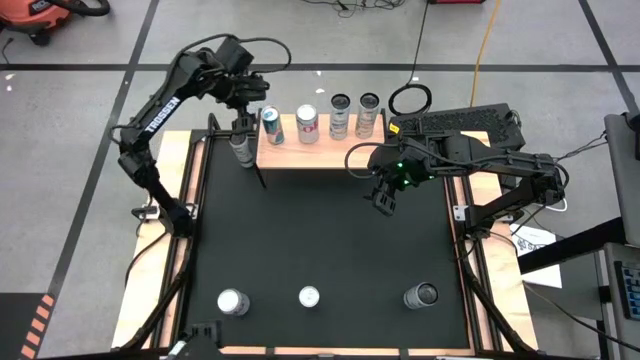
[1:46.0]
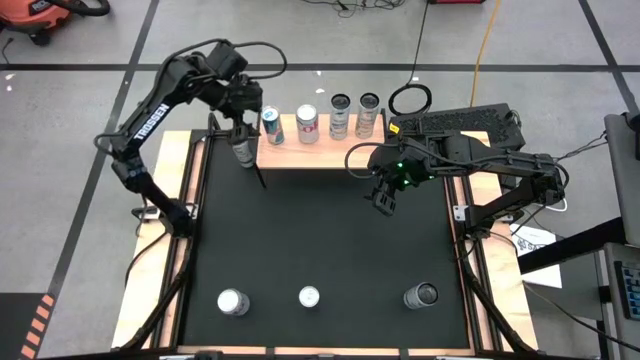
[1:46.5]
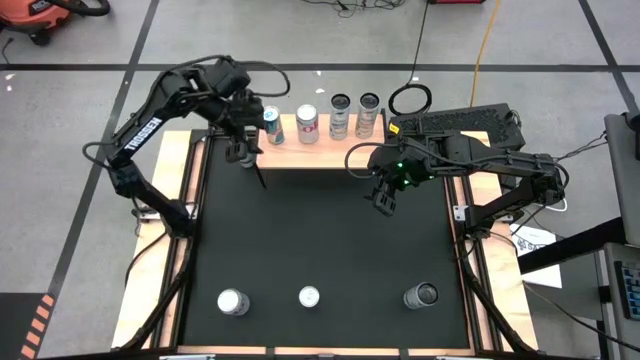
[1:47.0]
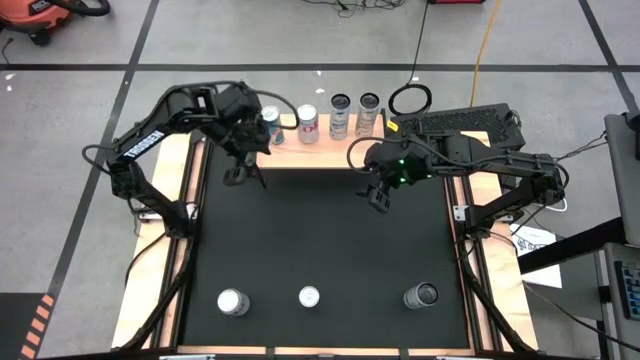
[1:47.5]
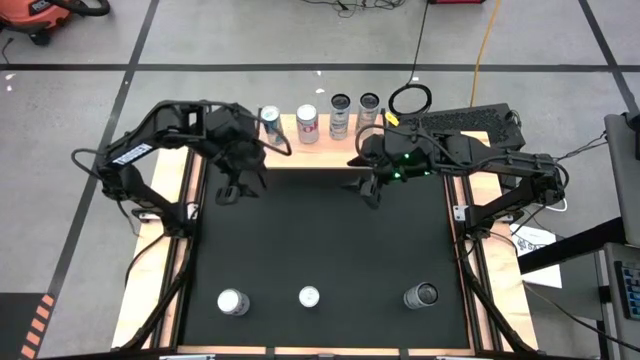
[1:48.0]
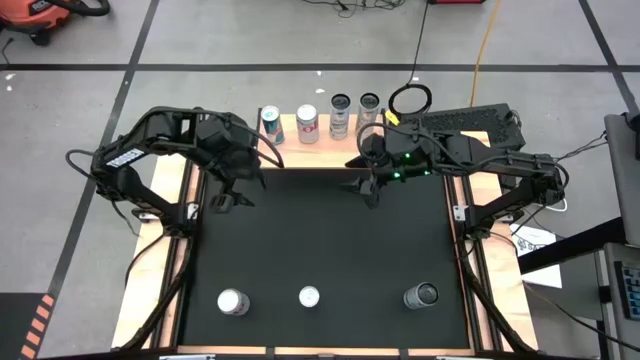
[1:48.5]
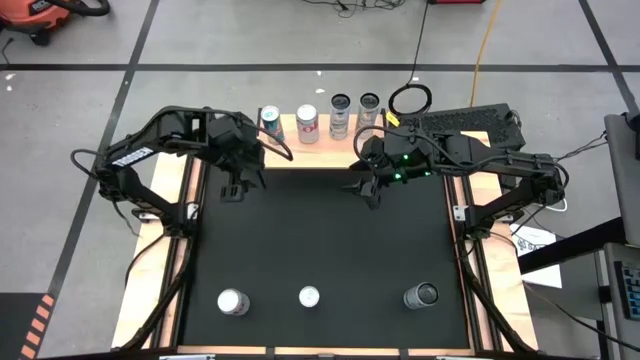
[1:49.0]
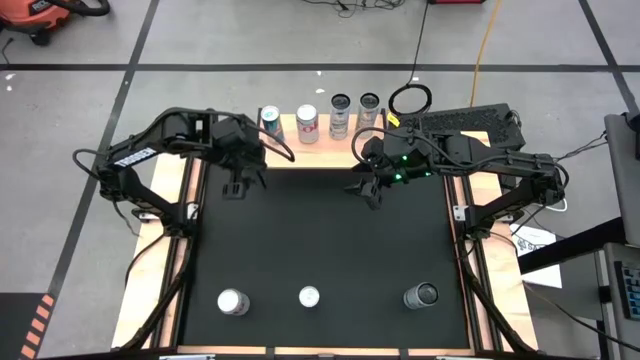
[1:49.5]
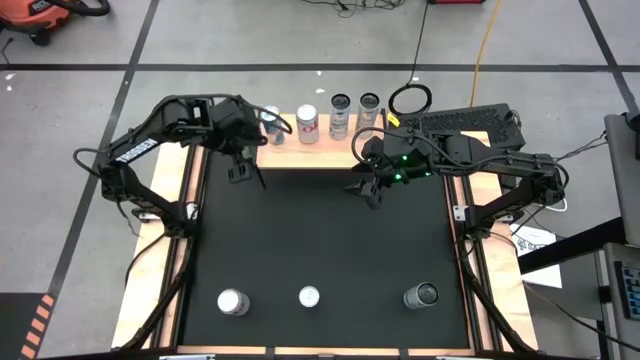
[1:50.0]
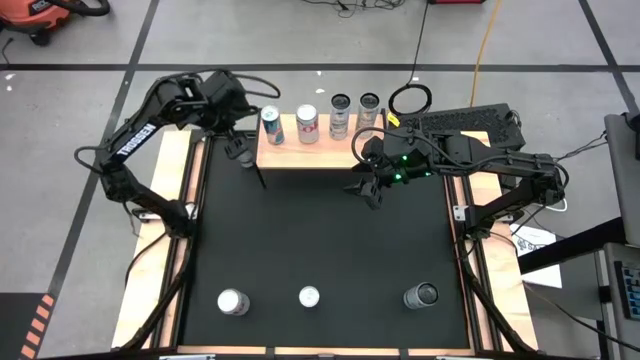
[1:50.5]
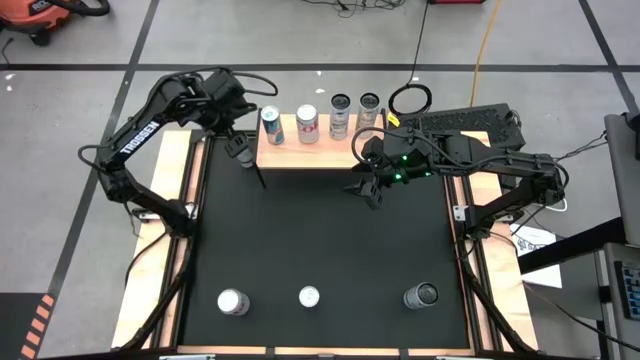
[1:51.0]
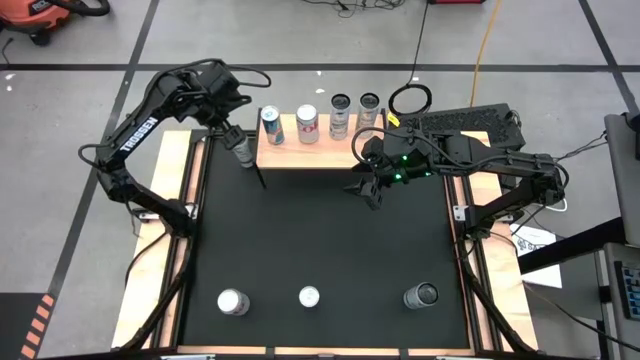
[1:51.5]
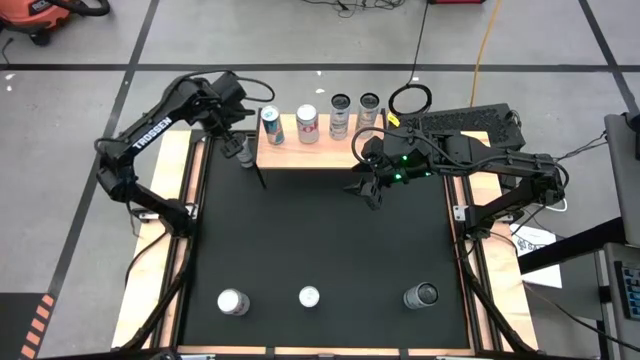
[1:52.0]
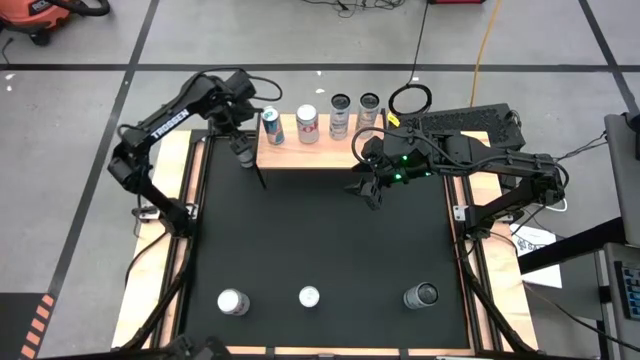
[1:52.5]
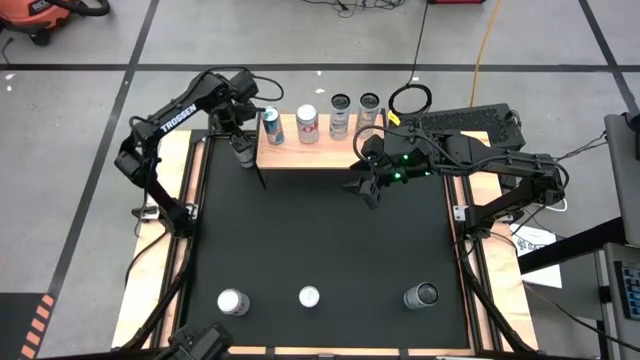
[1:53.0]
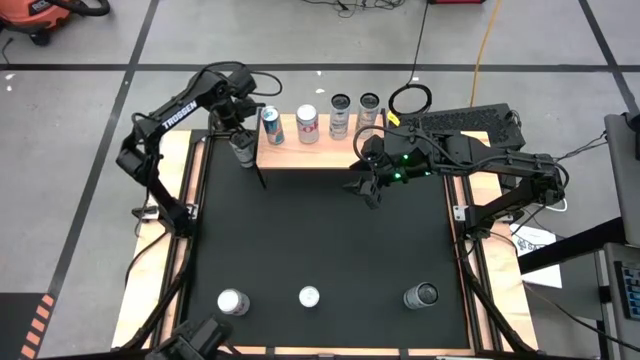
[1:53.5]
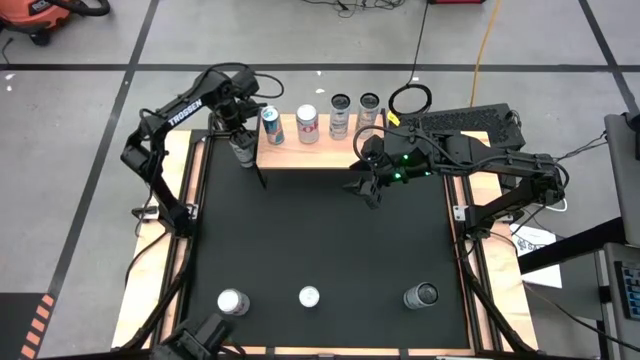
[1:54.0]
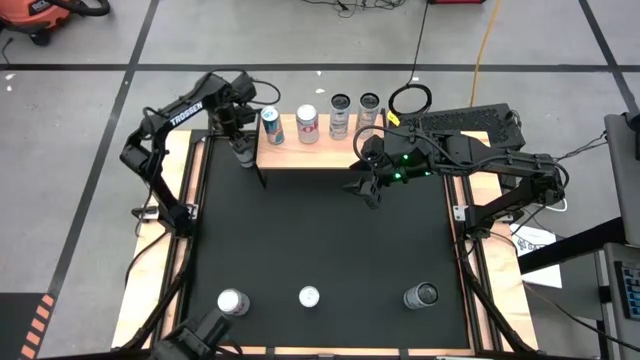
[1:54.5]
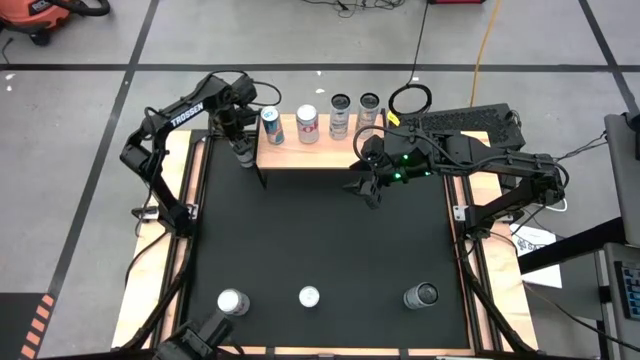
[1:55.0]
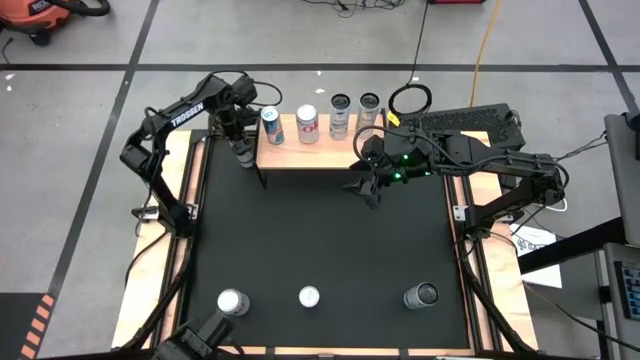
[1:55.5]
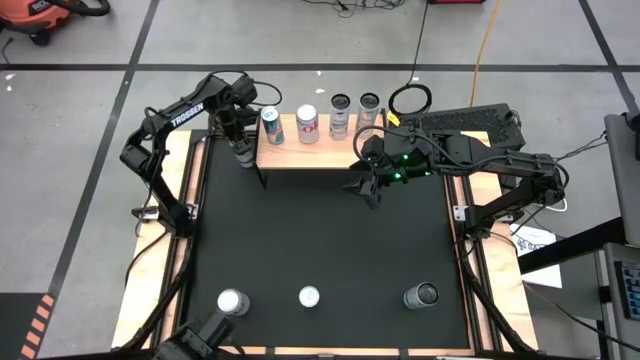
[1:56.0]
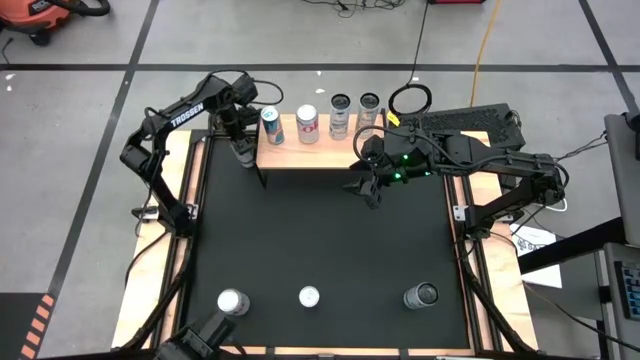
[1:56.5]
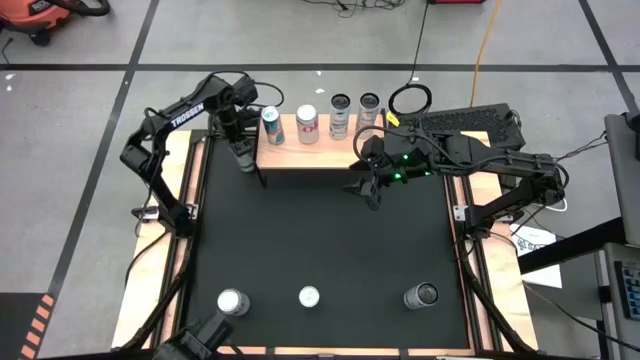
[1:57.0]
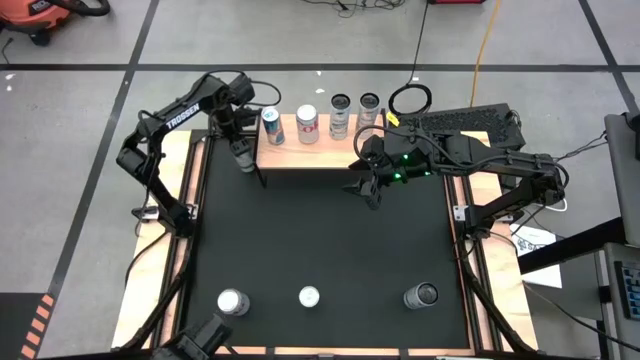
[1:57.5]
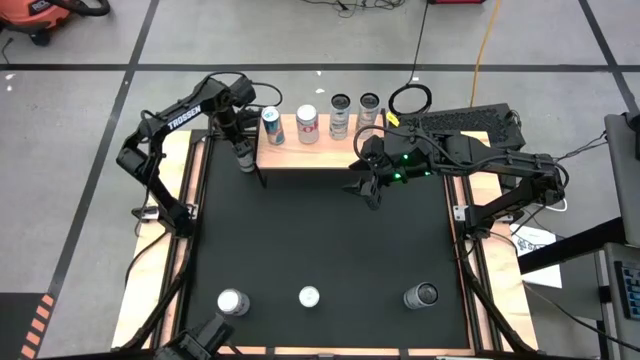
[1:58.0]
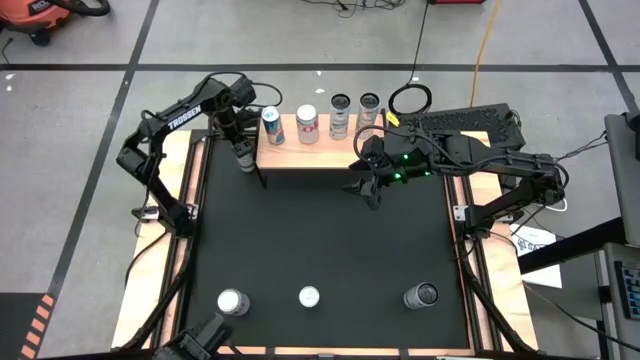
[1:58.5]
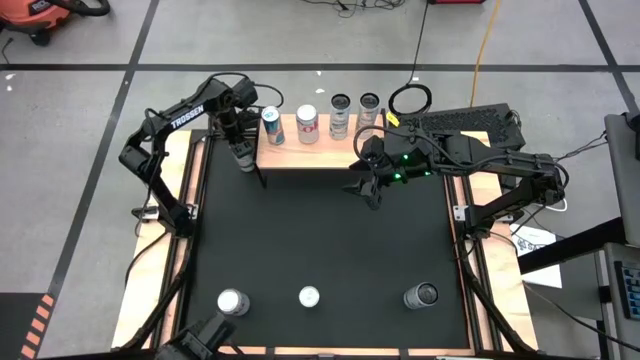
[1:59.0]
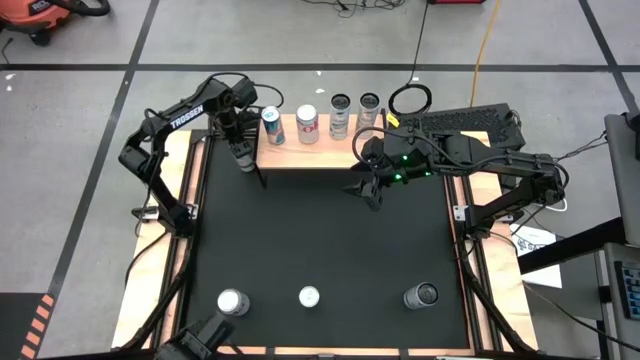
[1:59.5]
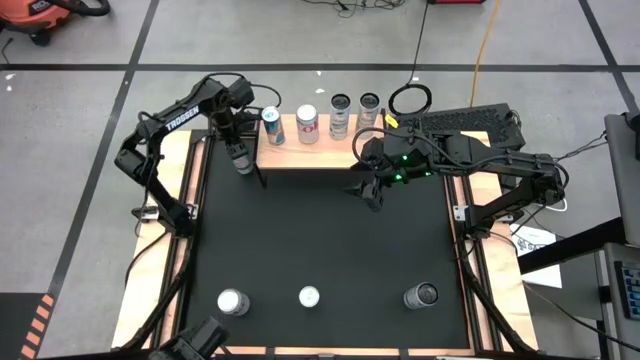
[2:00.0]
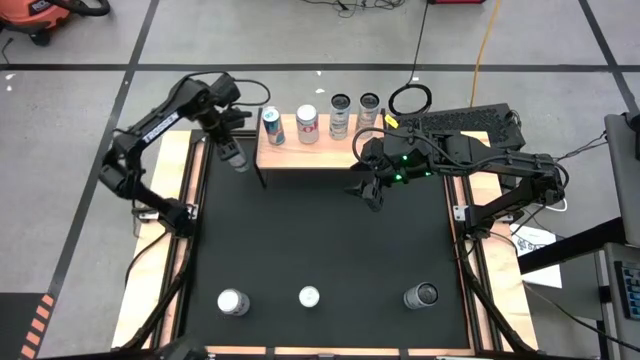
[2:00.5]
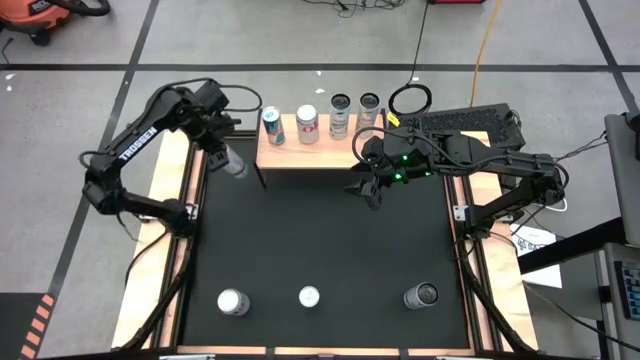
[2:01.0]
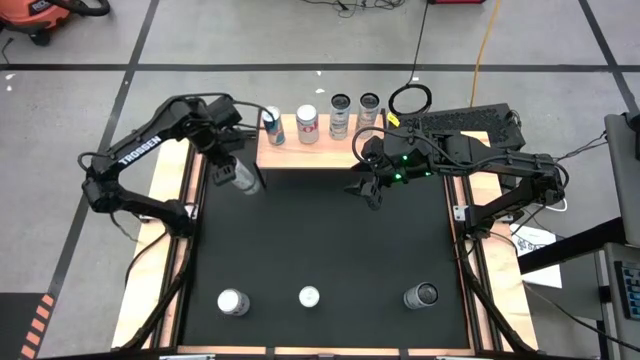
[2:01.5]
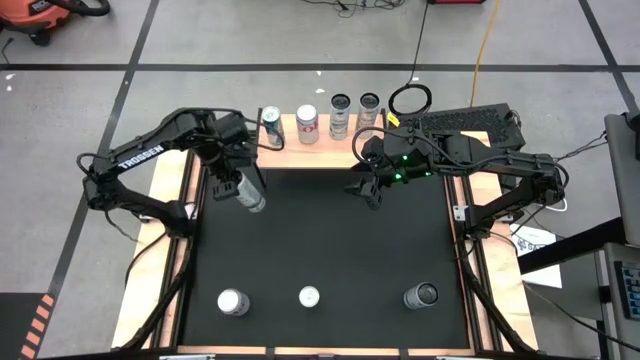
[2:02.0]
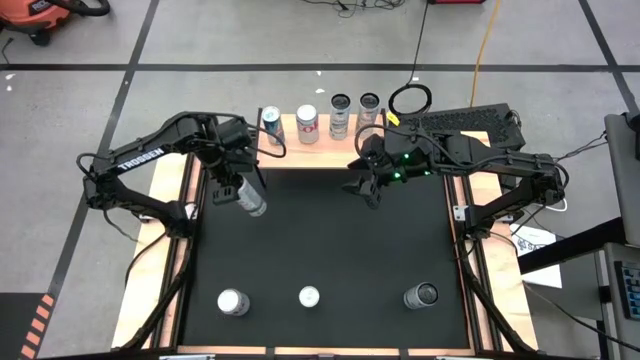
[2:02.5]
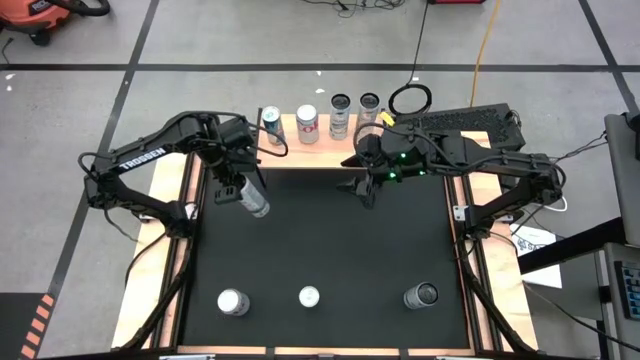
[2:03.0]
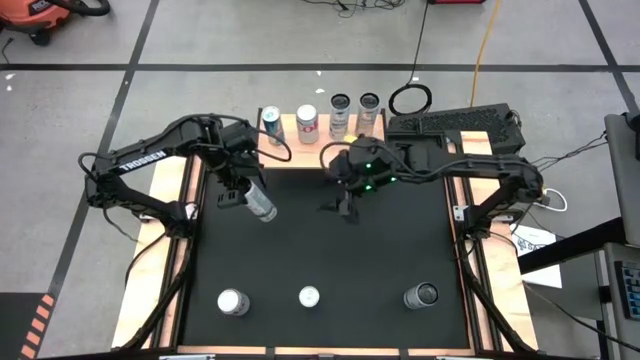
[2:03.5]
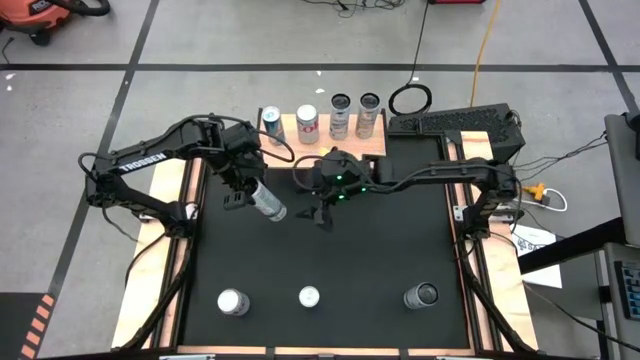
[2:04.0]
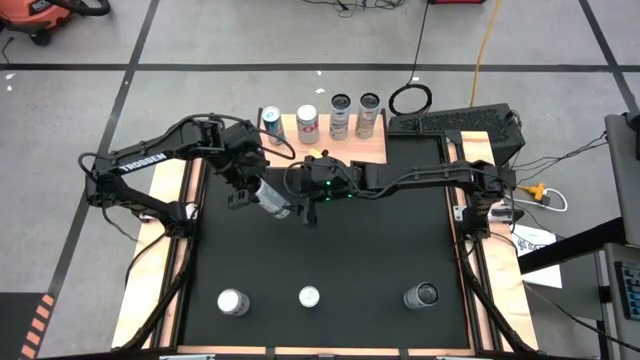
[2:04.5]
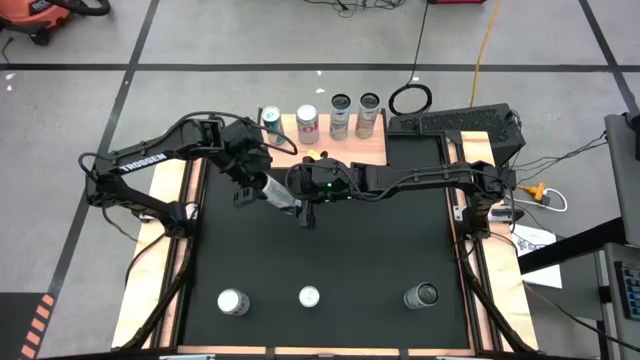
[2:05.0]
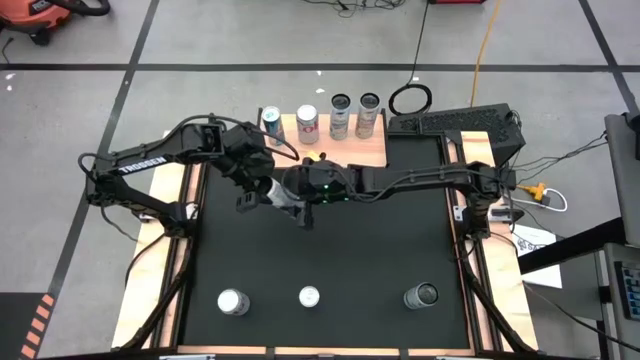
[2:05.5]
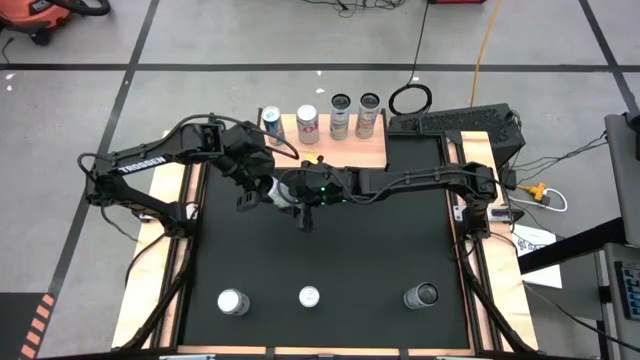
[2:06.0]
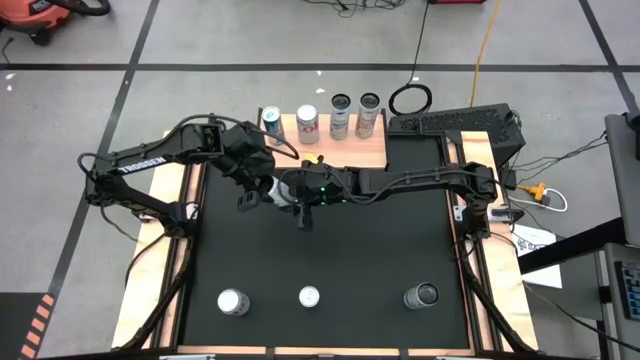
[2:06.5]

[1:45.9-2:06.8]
Task: Place canned beverage on shelf
Put the white yellow soda can on the shelf aligned with the other white yellow soda can

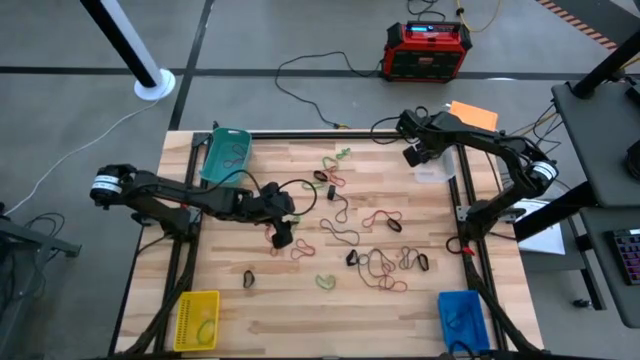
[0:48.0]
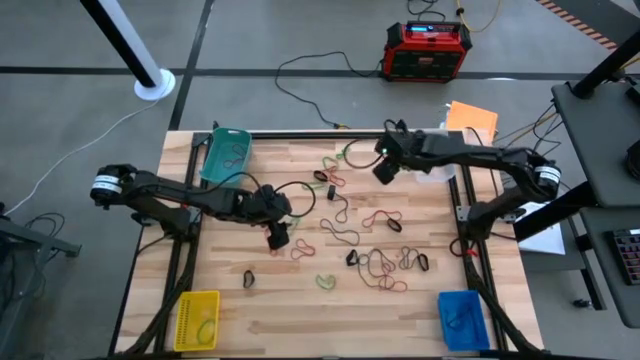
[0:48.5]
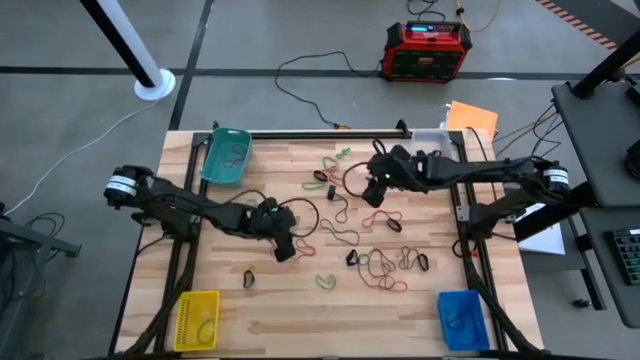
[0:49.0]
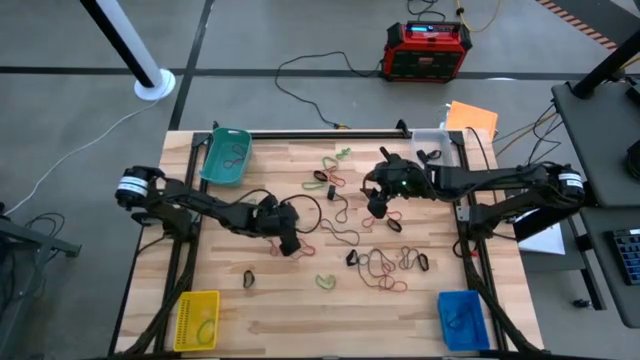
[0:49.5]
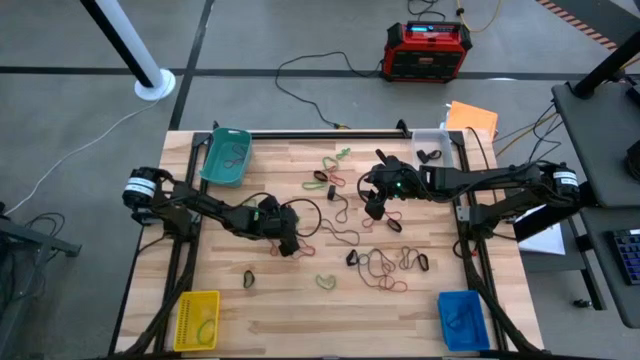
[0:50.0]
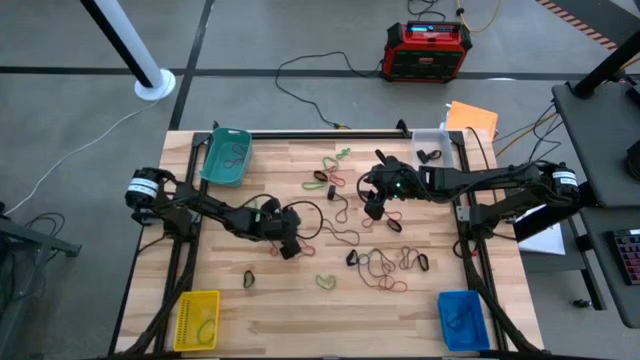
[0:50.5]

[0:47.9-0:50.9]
Task: Sort rubber bands into baskets
Put the green rubber band into the yellow bin
